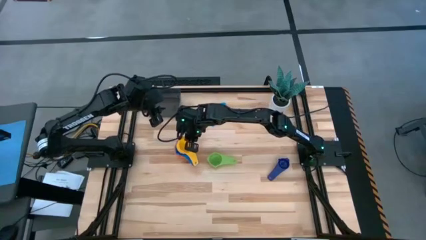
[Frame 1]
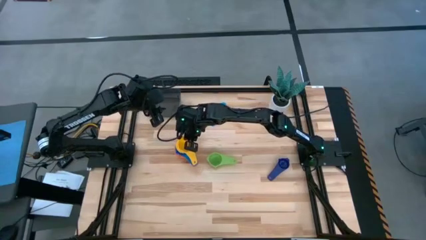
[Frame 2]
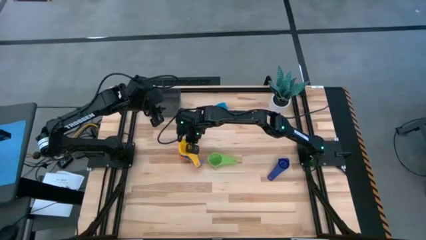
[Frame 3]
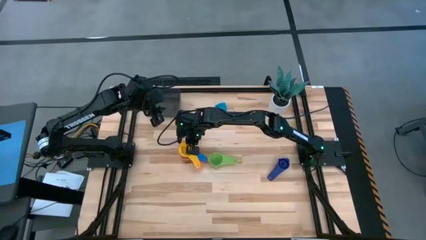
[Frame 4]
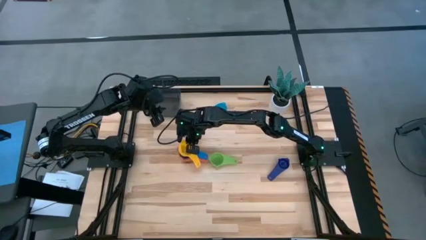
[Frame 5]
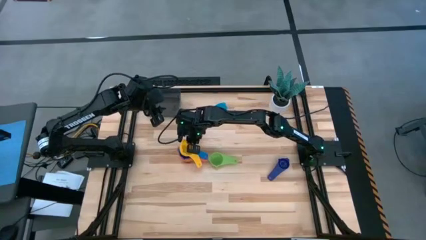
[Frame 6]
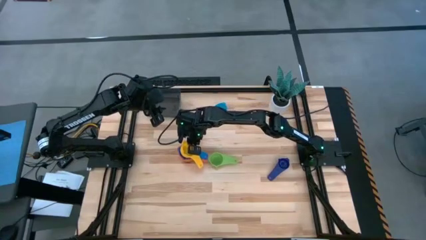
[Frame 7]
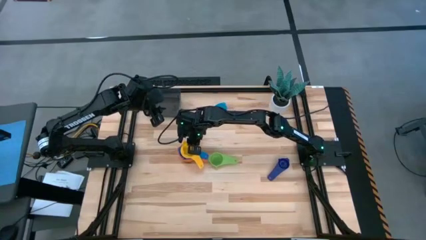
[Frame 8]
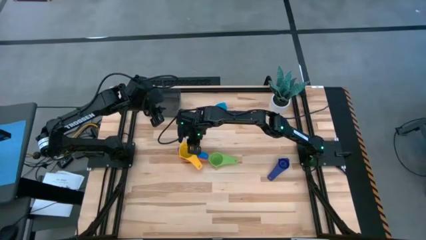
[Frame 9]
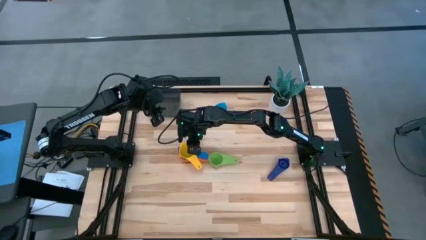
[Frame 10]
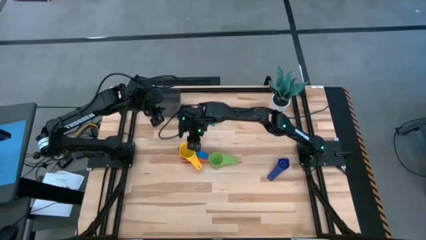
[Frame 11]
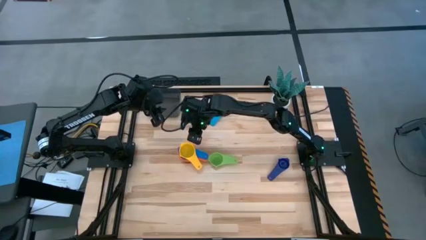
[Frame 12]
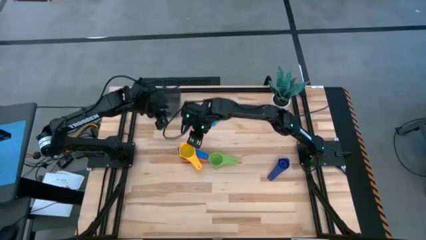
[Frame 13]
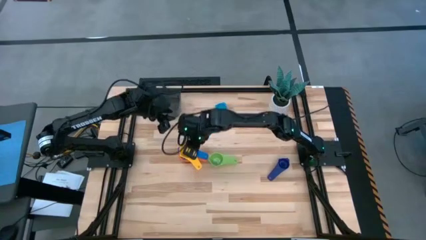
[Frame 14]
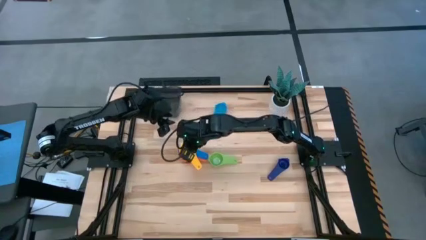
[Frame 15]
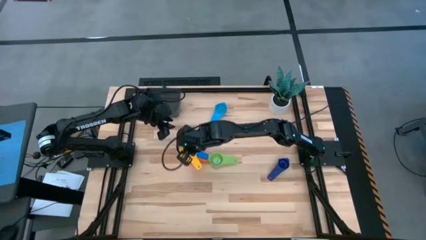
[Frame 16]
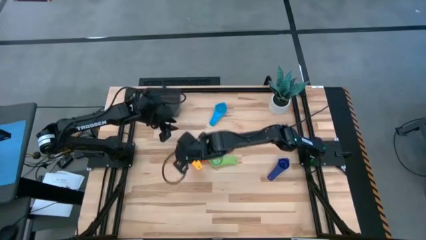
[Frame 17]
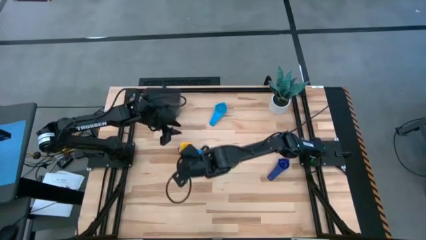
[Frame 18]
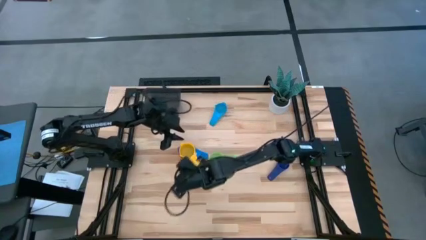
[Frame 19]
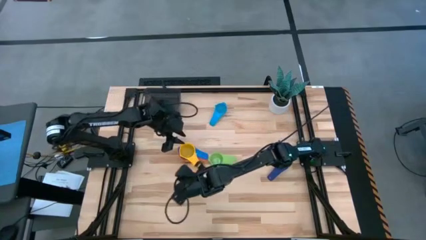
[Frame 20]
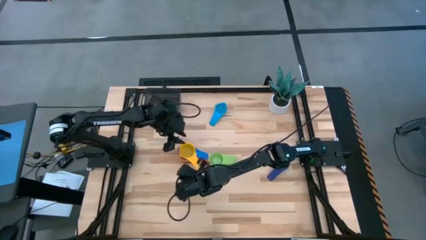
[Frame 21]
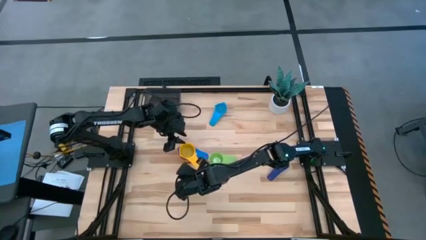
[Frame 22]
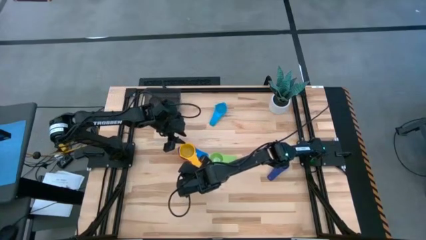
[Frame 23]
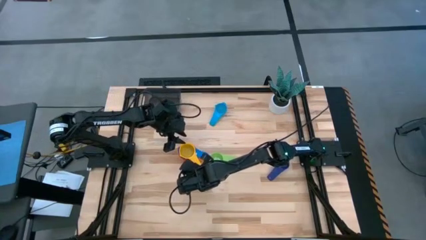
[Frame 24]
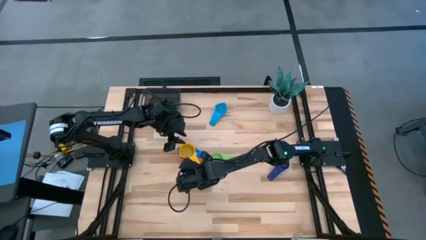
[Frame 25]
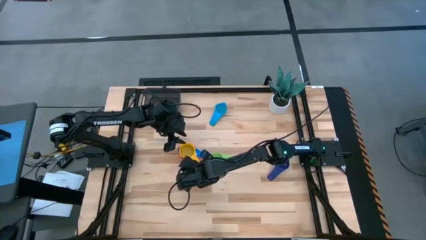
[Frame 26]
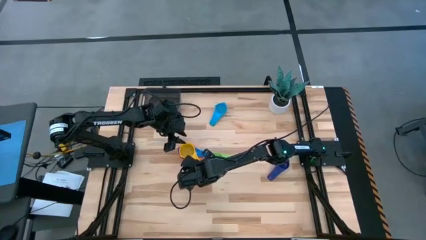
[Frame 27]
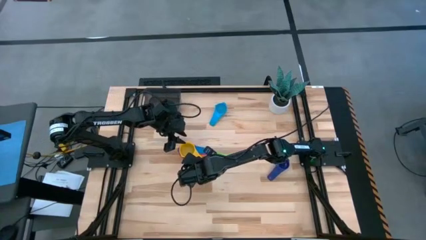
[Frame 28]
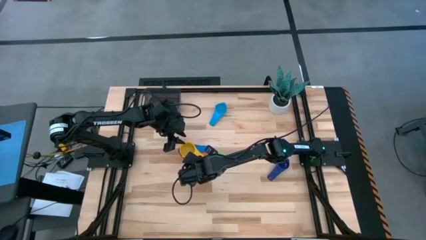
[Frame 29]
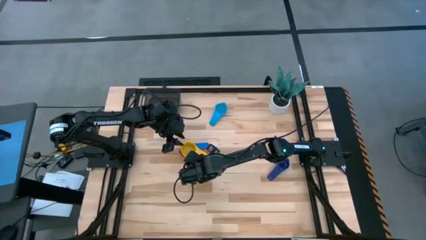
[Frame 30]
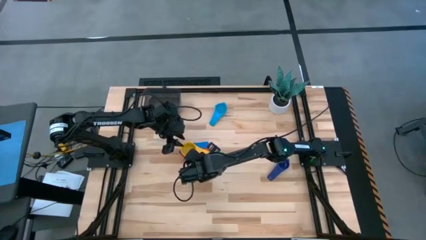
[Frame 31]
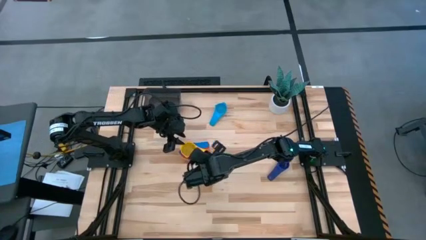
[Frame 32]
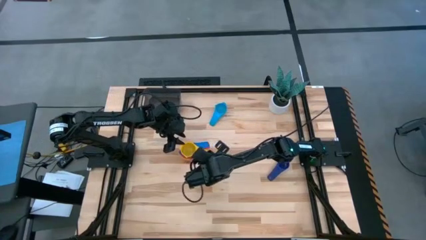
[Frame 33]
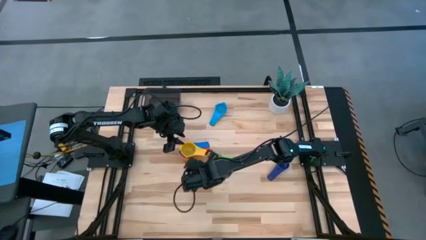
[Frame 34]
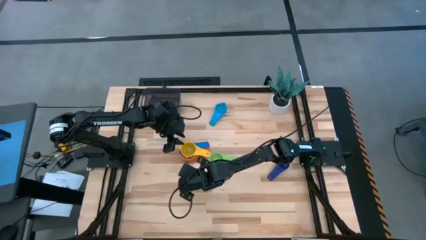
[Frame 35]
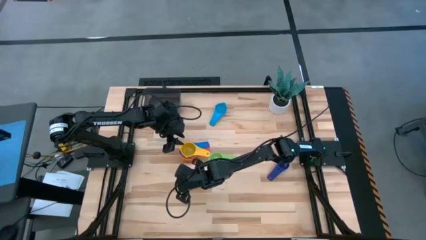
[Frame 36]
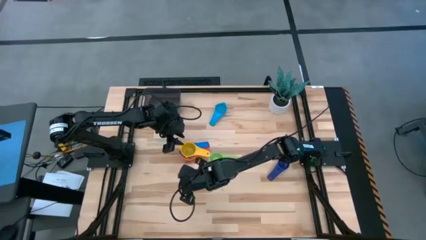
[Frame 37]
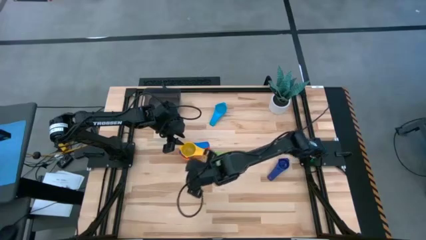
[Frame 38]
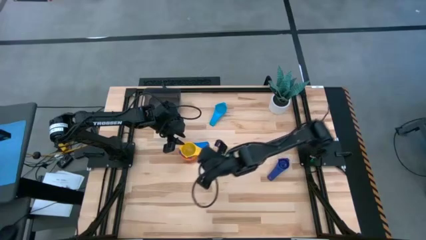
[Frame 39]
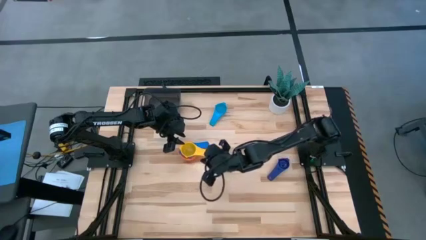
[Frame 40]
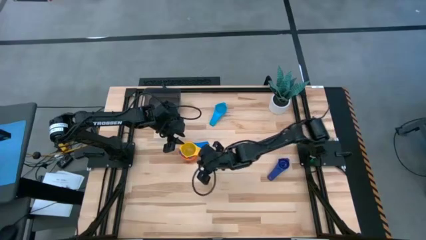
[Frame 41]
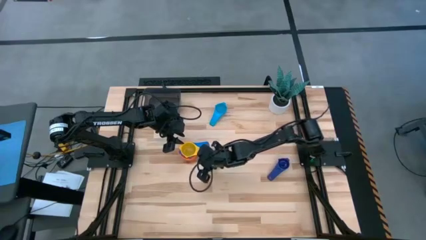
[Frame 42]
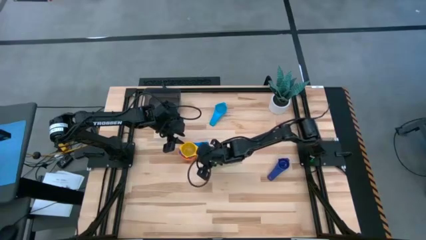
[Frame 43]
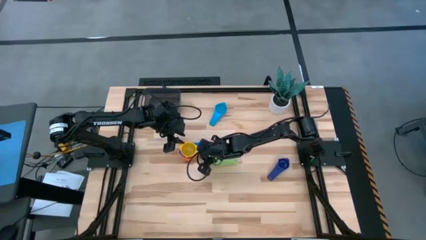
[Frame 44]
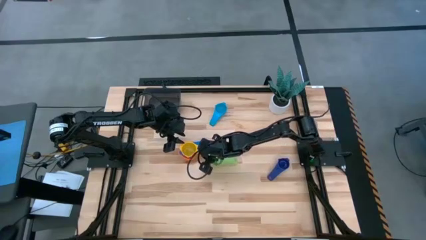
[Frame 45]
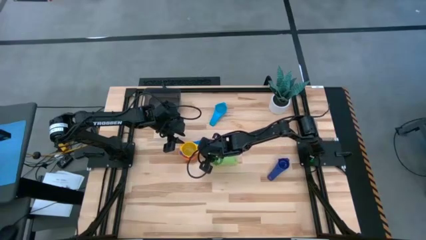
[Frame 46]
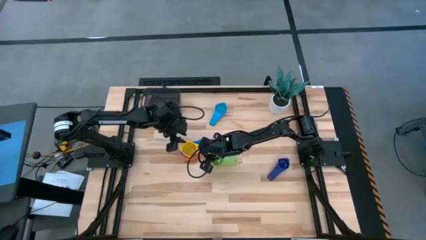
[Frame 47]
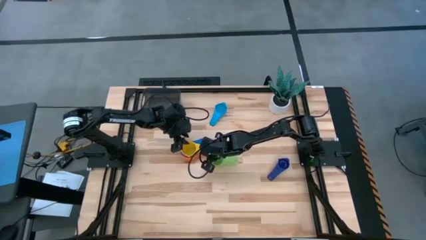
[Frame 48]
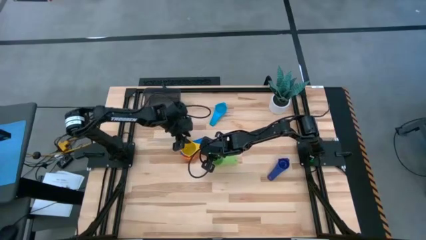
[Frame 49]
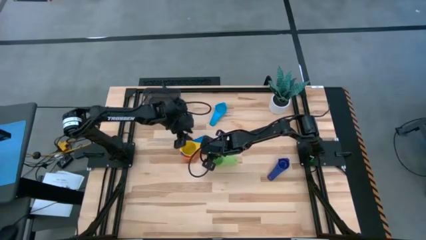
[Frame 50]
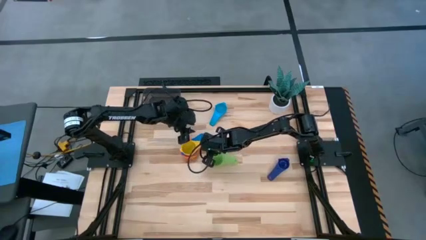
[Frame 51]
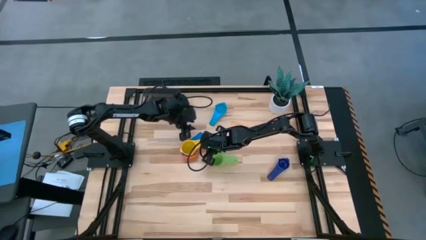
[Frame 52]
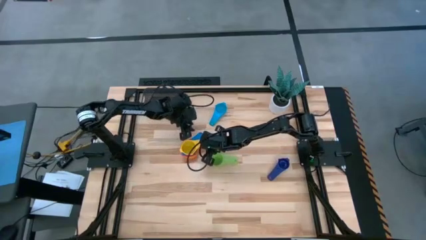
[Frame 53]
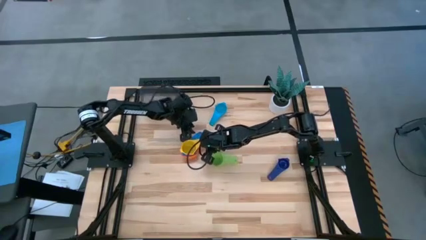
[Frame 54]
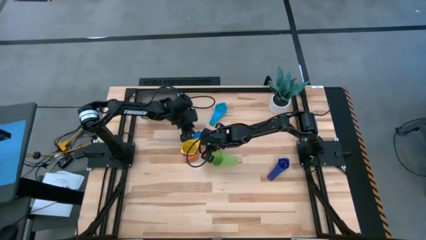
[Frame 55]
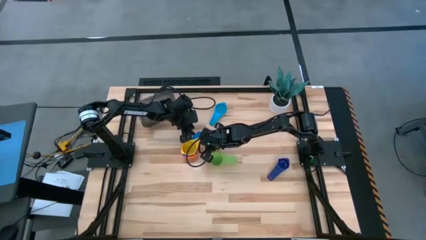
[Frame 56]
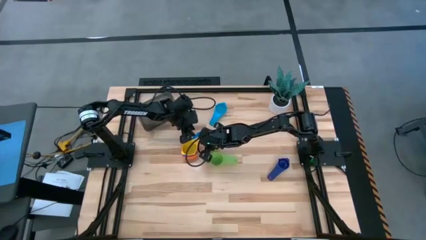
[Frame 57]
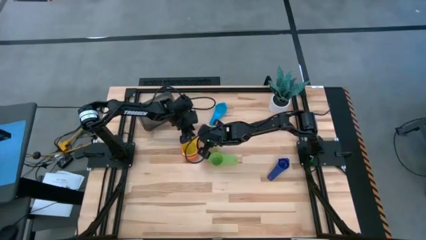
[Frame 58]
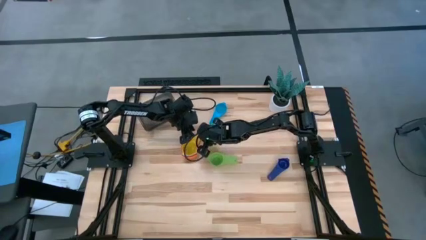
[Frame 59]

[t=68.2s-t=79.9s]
Task: Nest measuring cups in basket
Stack the yellow measuring cup on top of the blue measuring cup

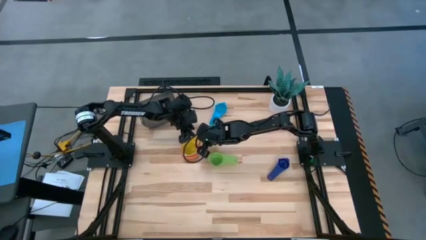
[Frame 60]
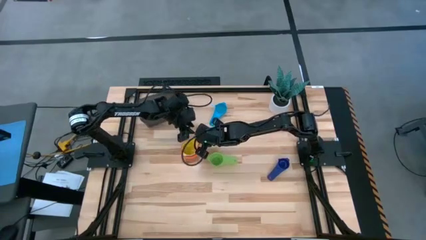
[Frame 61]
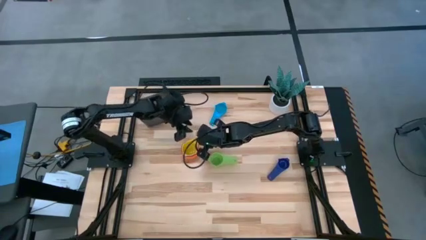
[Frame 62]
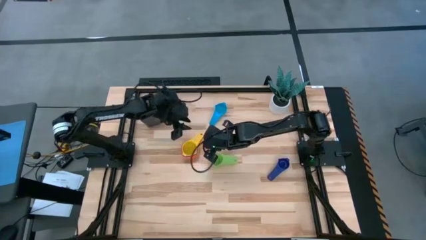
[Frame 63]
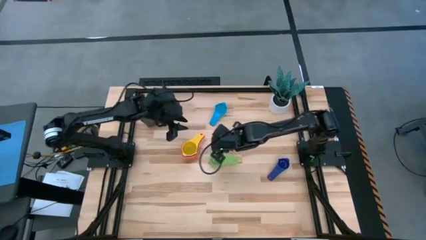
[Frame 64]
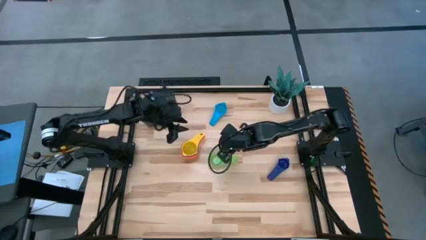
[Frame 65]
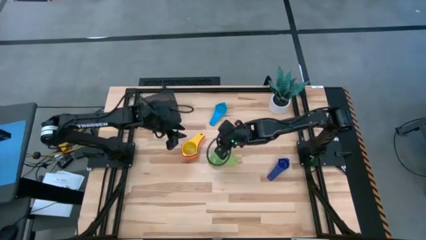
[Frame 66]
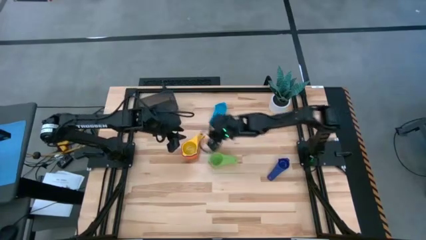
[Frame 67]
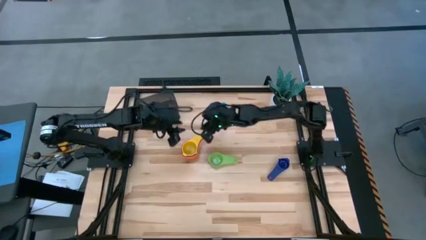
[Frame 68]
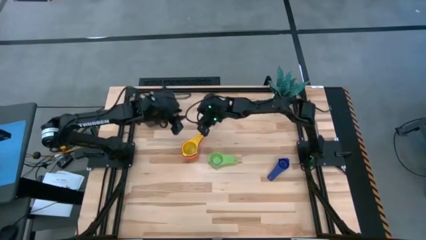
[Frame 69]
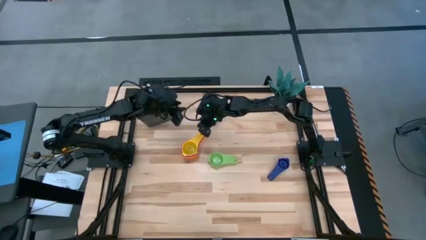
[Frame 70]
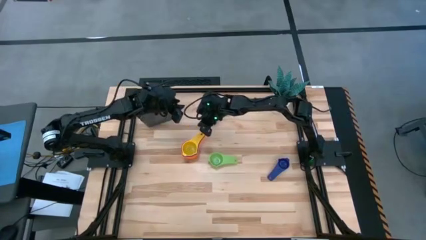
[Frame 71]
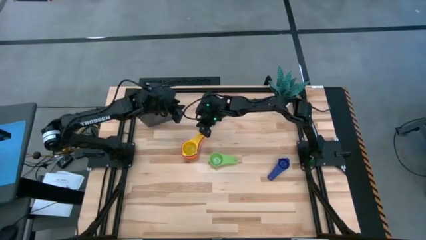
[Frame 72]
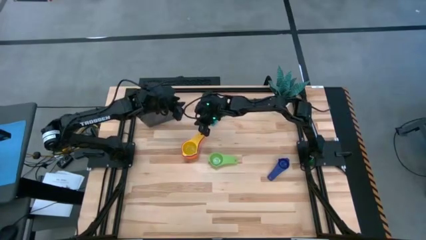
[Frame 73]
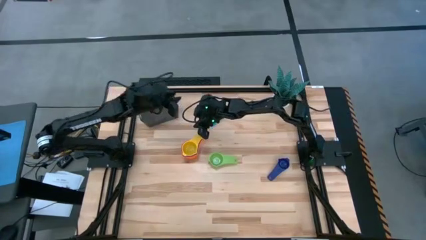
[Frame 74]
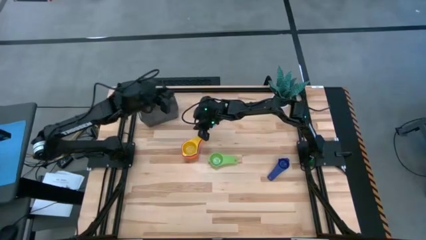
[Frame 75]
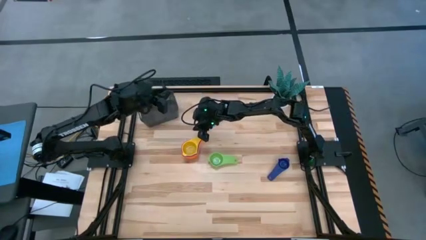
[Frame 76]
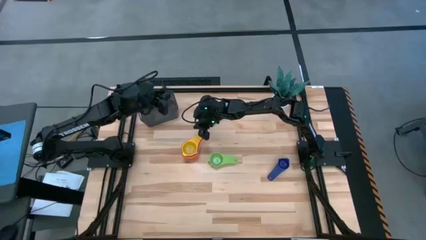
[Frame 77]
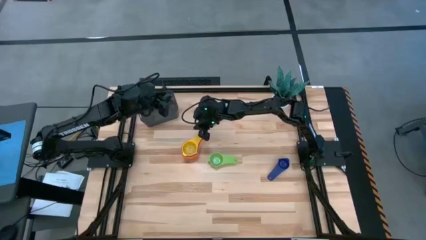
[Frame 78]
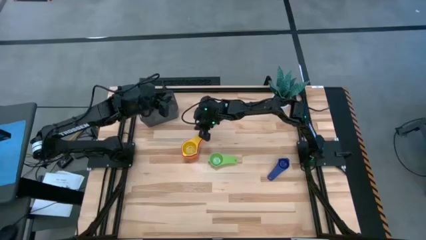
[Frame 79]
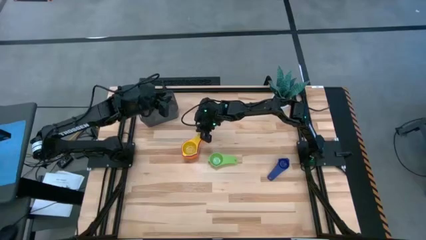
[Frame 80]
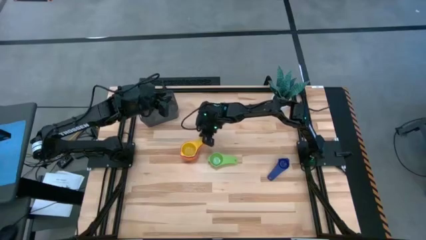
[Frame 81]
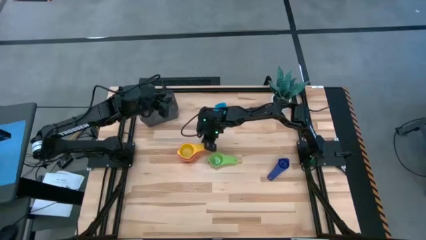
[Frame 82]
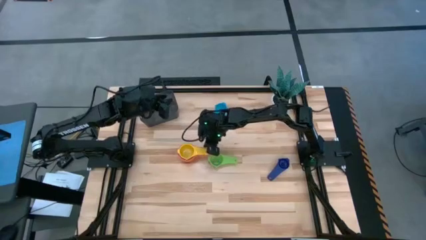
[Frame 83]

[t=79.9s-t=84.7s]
Adjust the stacked measuring cups on the table
